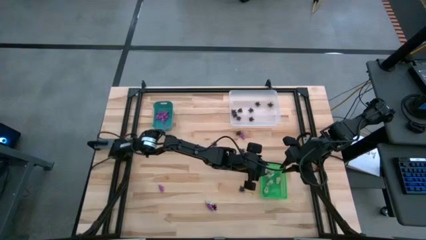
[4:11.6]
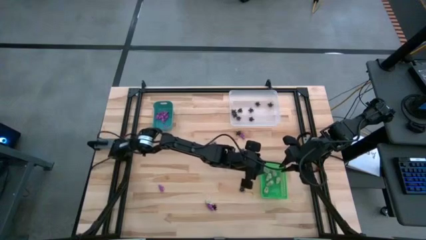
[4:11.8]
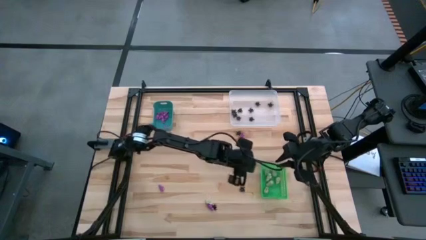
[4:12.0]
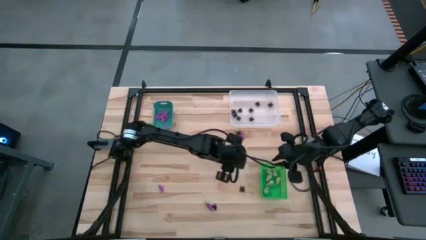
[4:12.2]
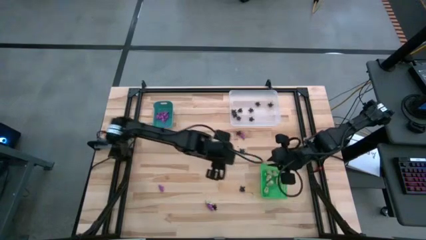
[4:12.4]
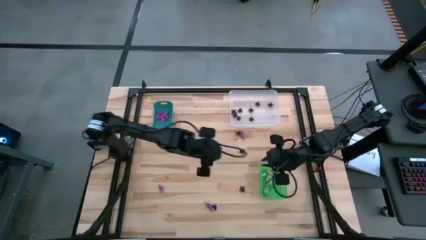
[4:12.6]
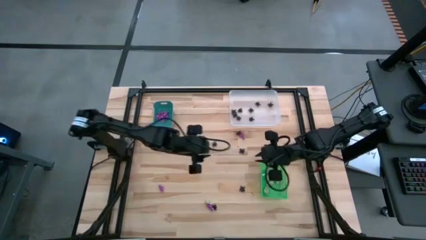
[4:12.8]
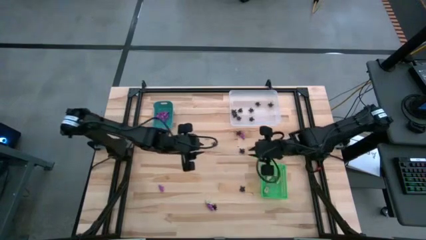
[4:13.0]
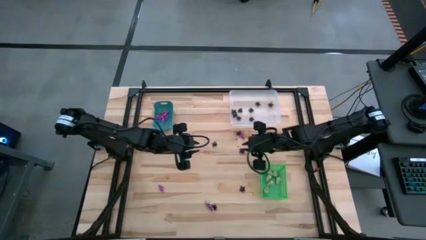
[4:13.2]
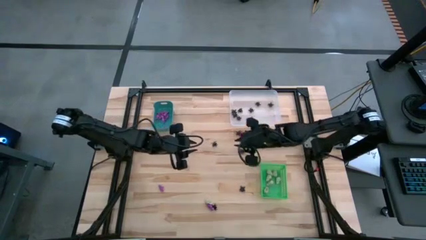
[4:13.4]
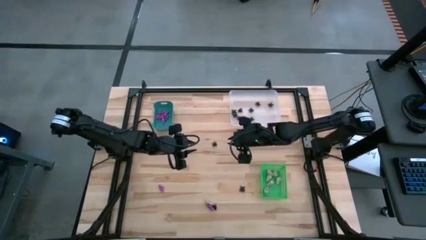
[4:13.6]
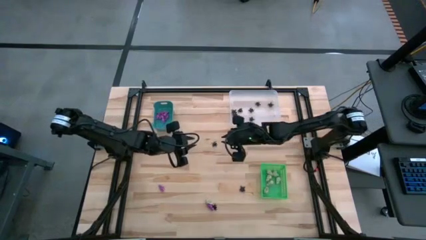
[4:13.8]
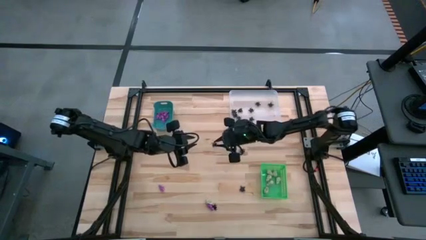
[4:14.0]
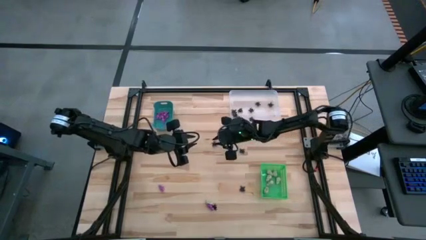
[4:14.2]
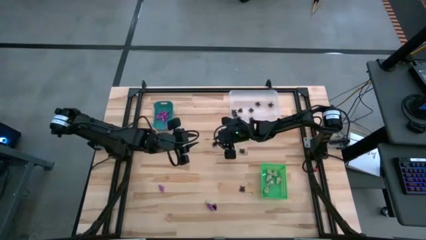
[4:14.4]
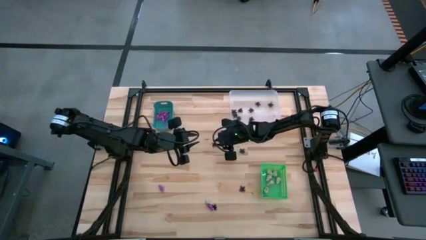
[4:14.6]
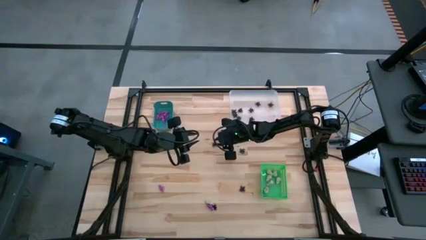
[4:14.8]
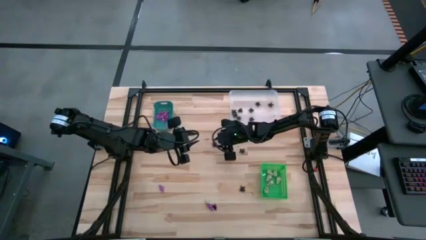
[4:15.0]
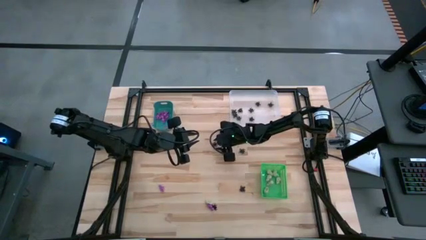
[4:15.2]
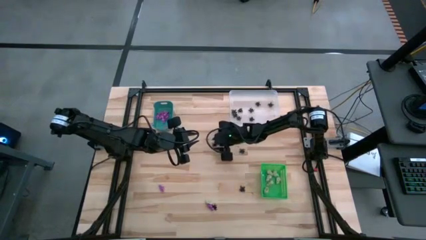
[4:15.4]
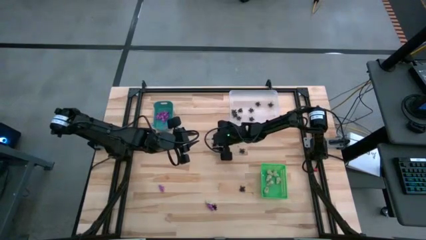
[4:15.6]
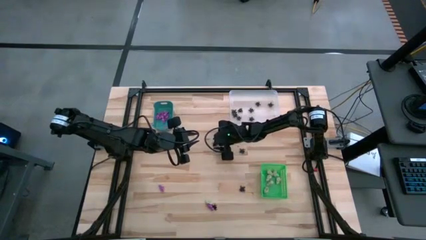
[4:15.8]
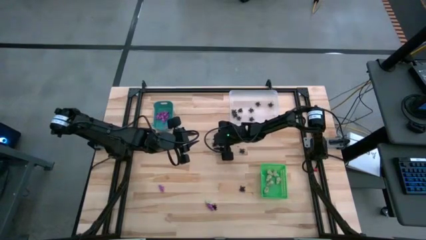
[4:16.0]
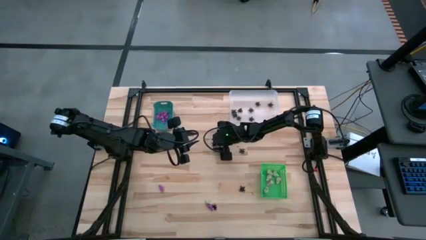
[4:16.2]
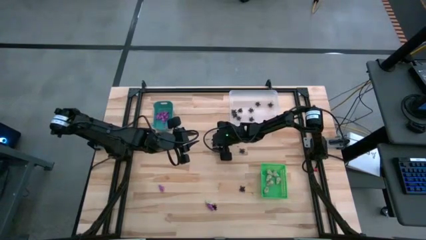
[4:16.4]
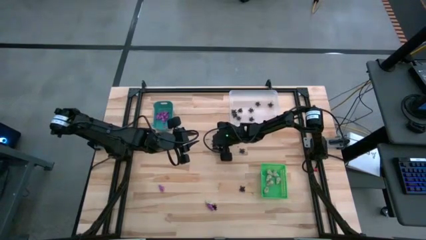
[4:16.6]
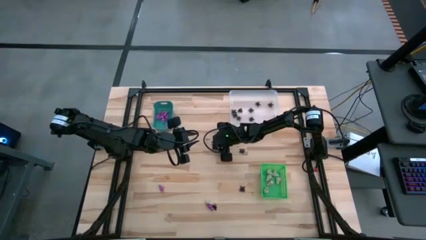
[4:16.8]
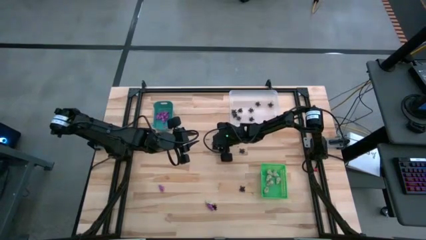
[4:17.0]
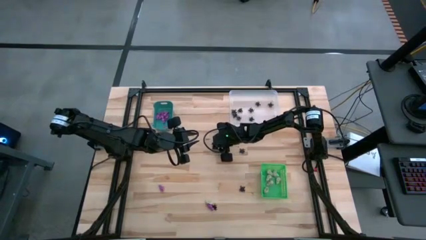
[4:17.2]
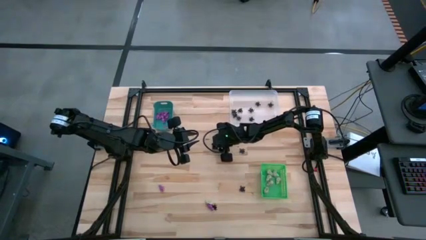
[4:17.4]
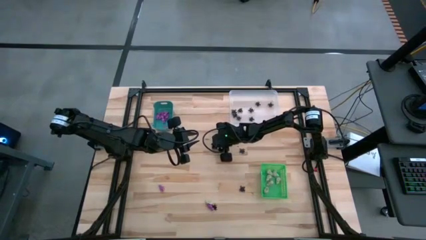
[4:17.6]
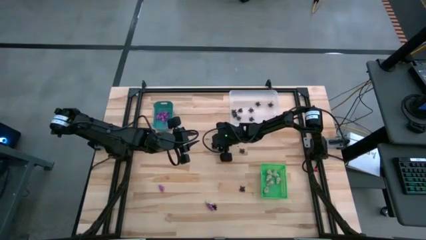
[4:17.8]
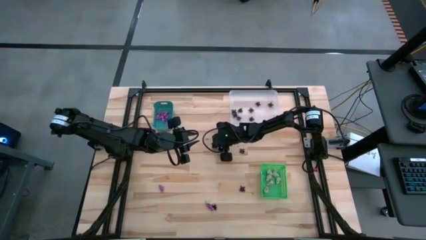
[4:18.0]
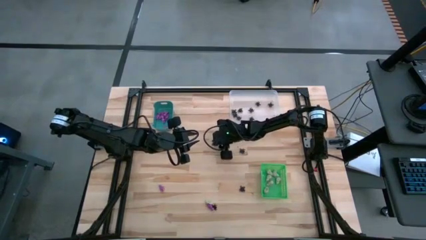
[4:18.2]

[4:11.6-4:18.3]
Task: Sort Halloween decoration
Put the black spider toy into the white bin

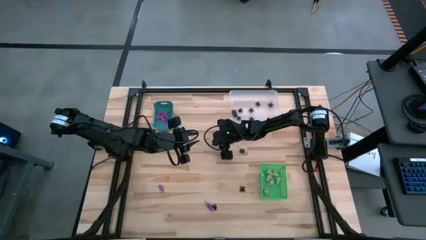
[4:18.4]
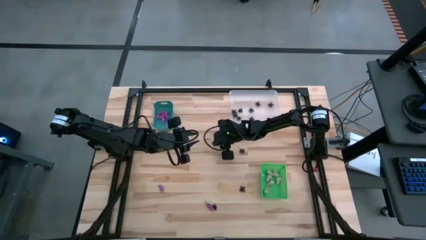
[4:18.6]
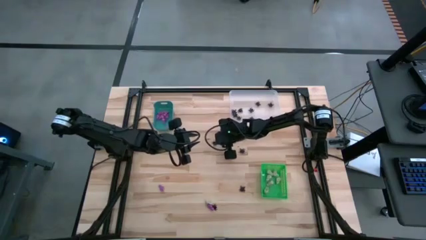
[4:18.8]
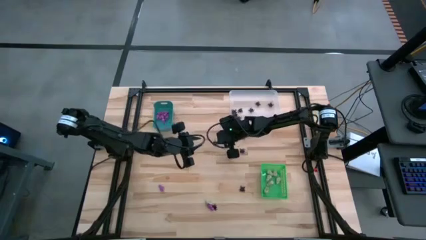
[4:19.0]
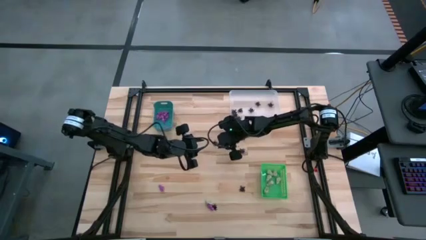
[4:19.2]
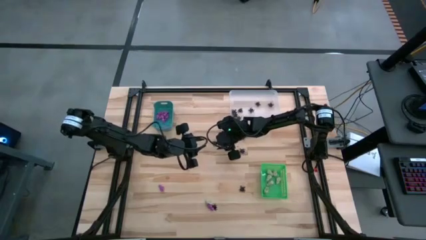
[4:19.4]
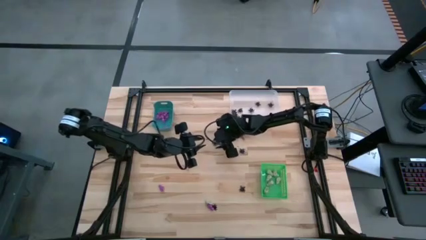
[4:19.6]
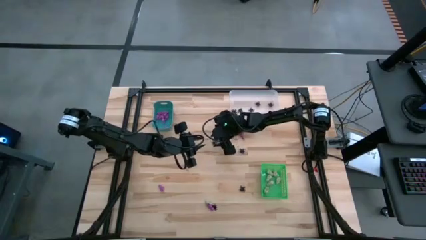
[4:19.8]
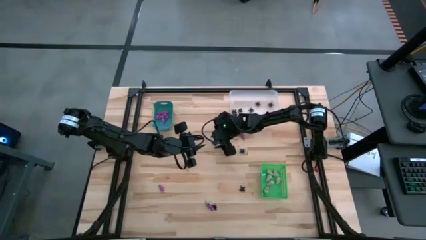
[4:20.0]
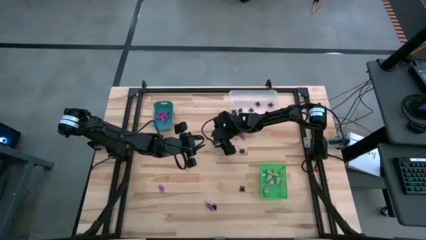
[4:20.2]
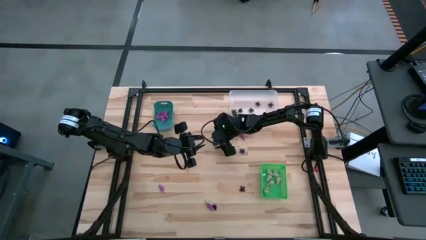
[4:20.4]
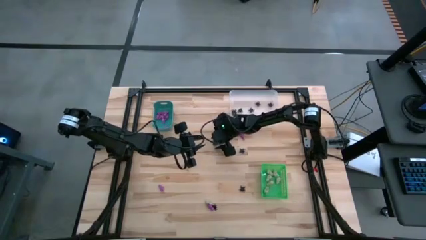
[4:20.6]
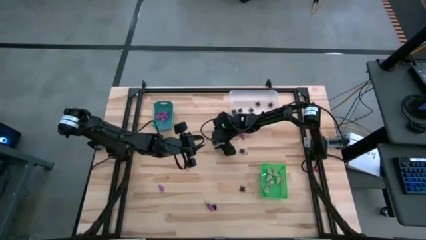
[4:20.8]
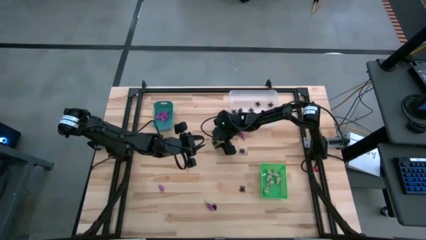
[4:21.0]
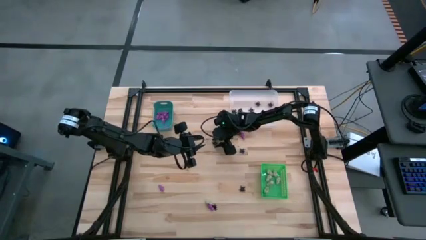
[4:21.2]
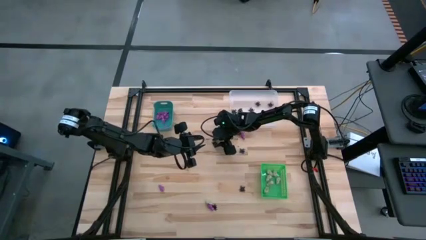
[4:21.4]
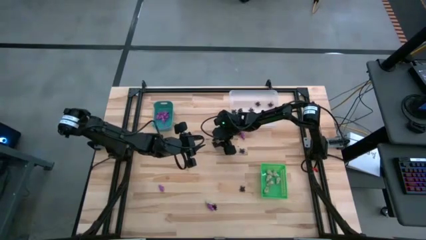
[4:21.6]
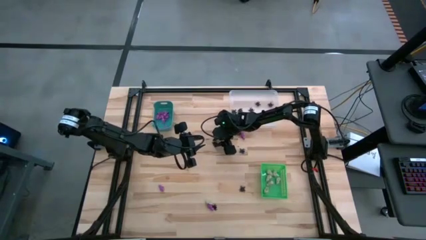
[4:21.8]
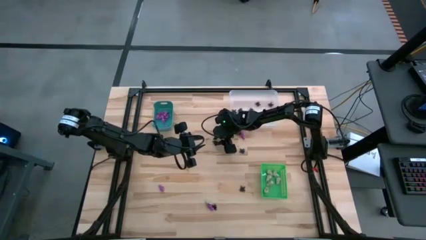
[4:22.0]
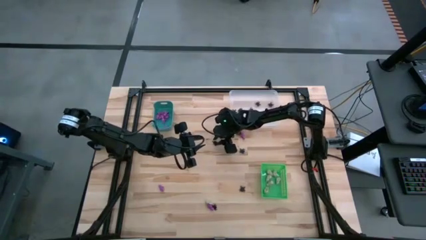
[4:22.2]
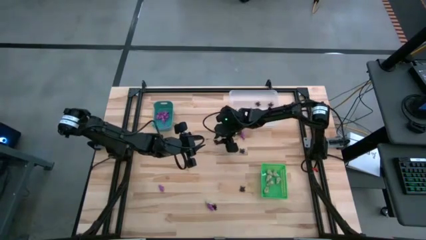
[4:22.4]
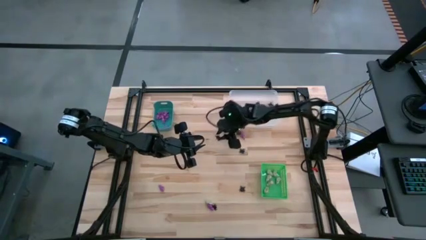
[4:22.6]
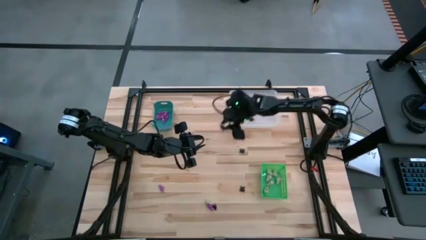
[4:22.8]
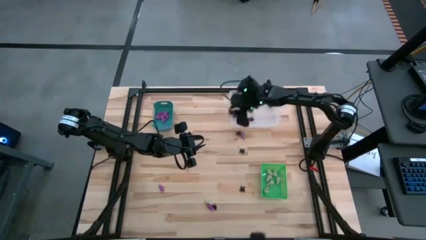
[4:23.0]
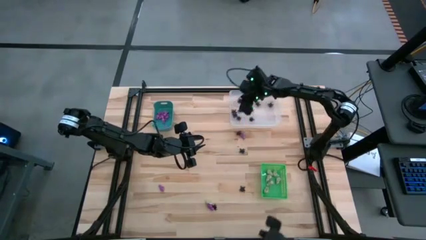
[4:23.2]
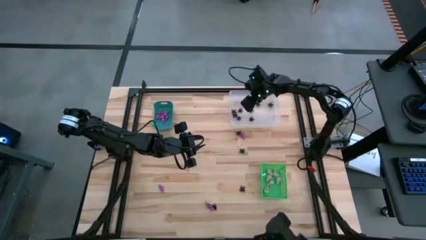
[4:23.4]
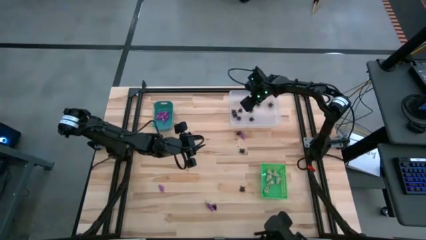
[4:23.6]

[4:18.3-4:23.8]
Put the black spider toy into the white bin

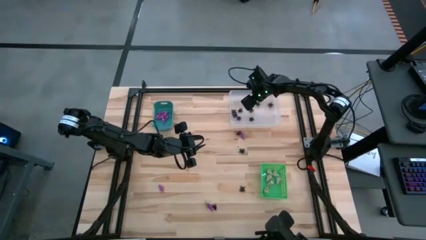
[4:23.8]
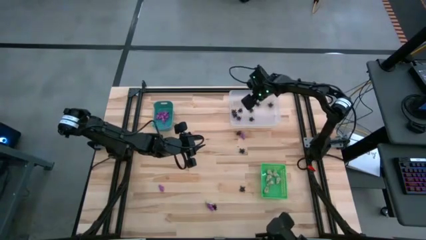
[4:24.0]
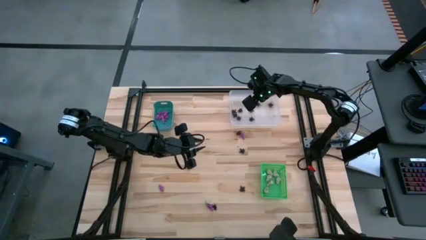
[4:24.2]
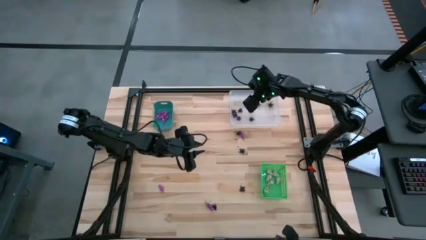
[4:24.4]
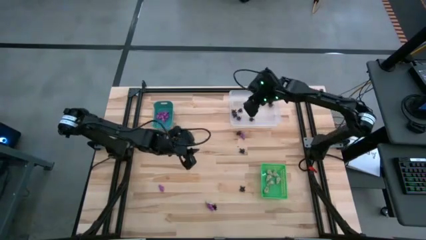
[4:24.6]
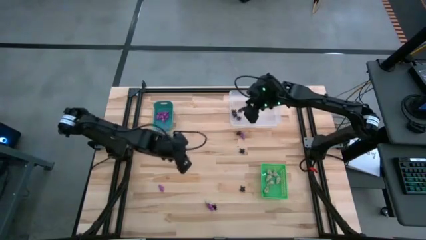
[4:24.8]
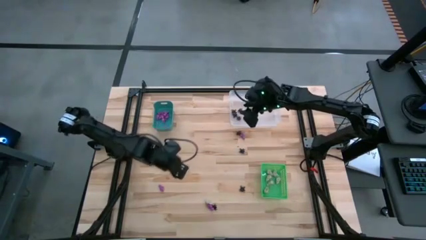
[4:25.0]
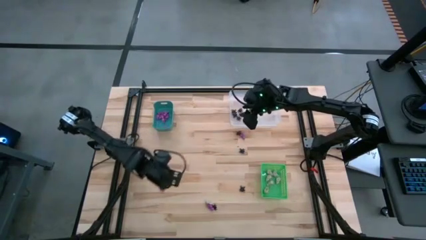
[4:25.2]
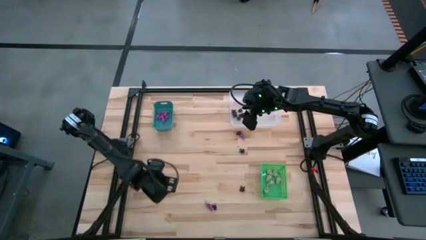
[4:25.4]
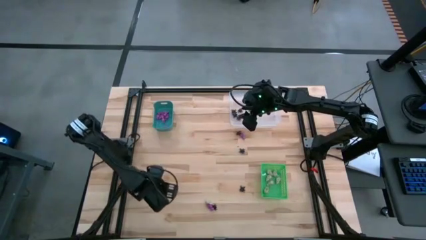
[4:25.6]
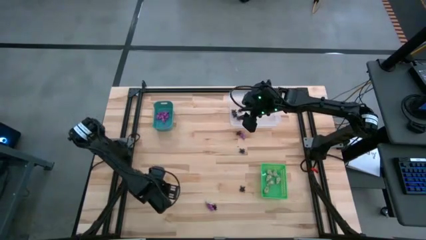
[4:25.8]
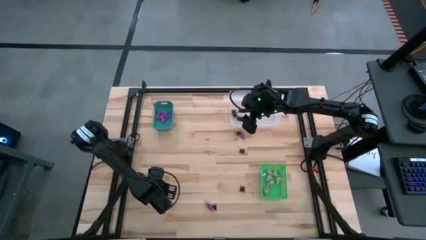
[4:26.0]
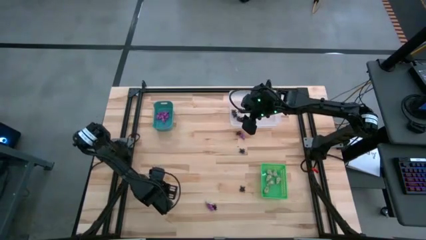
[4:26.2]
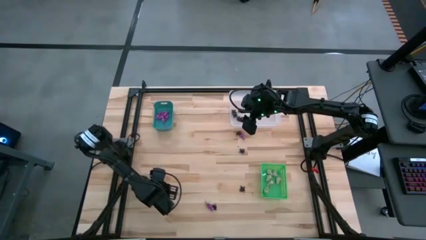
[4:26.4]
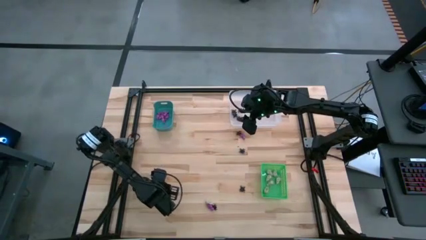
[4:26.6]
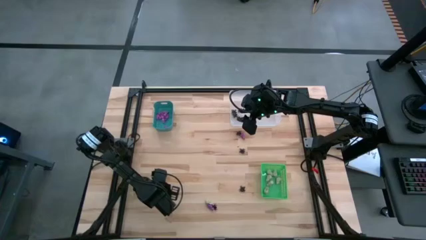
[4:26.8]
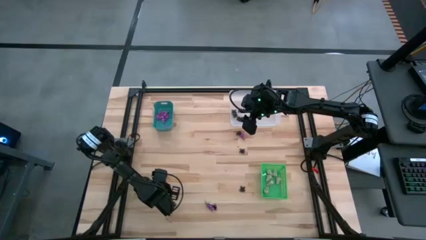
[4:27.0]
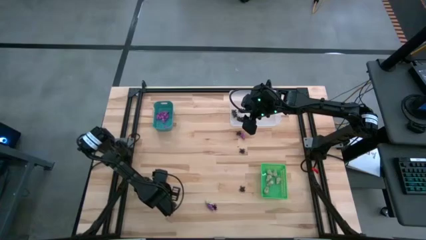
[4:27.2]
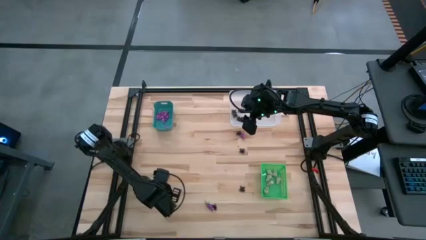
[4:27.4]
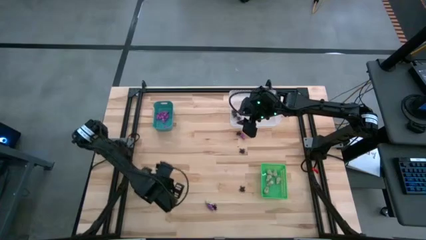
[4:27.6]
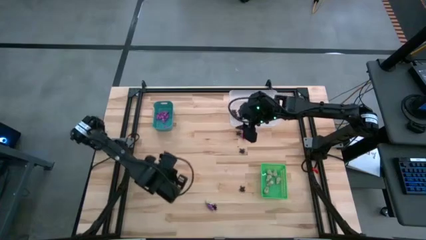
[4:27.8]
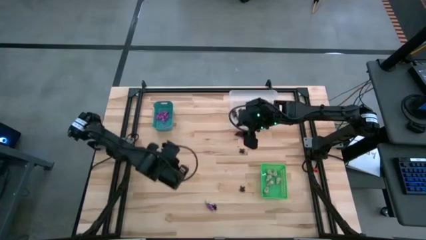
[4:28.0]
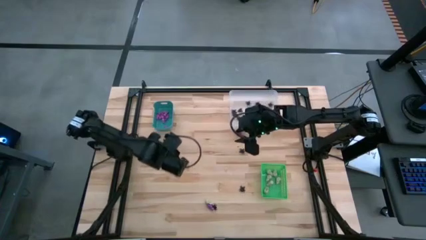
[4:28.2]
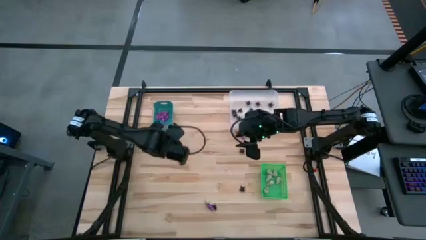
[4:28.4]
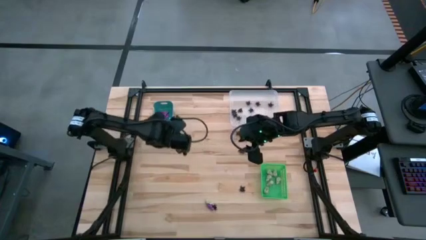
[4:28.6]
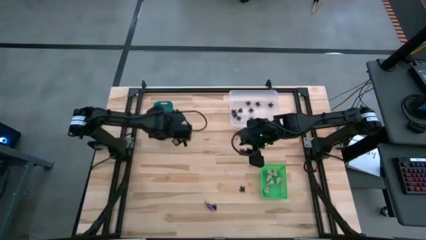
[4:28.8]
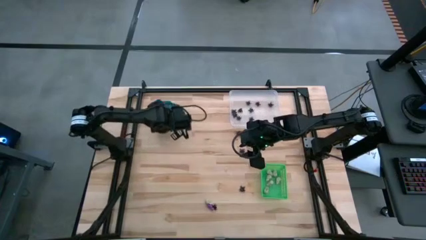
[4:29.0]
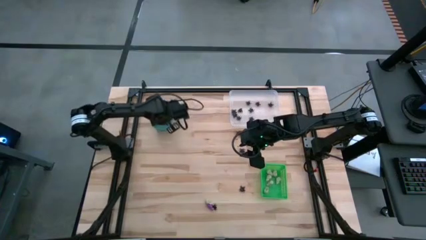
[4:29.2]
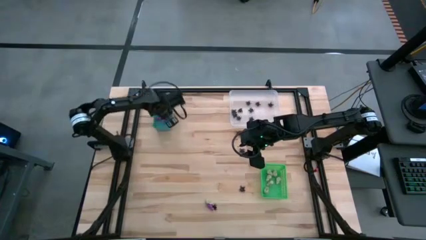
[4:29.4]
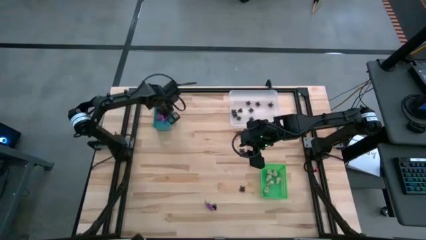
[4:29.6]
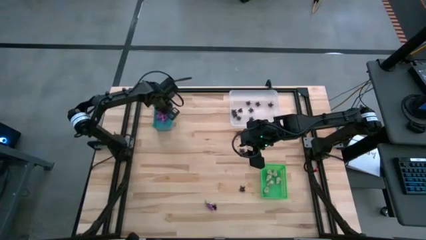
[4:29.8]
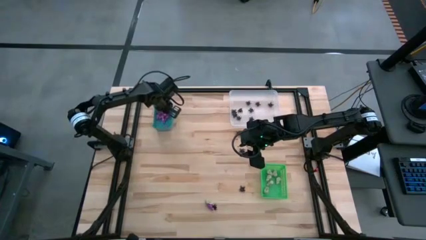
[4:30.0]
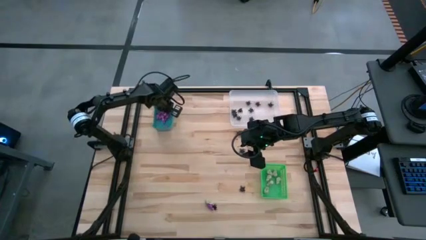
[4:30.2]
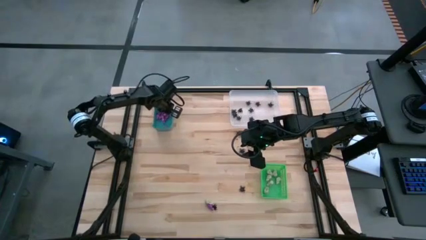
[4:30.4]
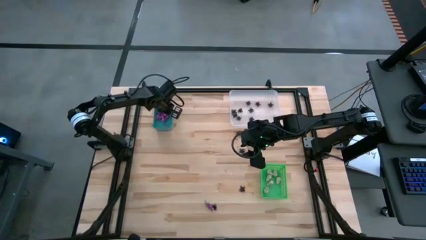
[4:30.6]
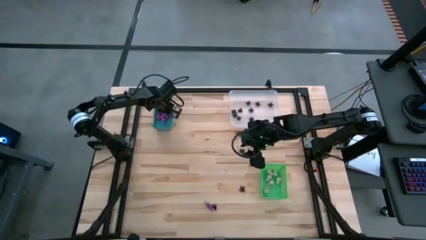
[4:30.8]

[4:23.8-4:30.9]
Put the purple skeleton toy into the blue bin
